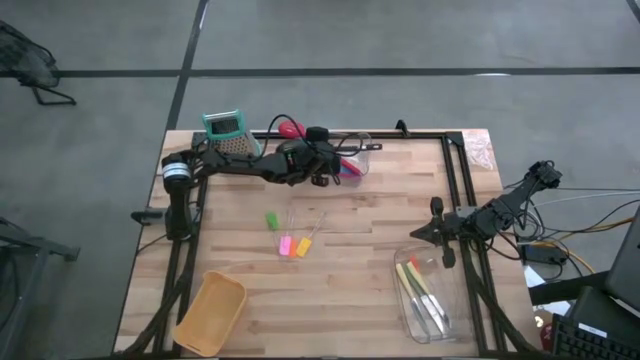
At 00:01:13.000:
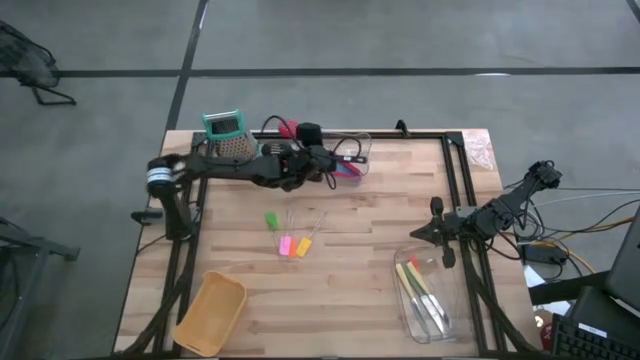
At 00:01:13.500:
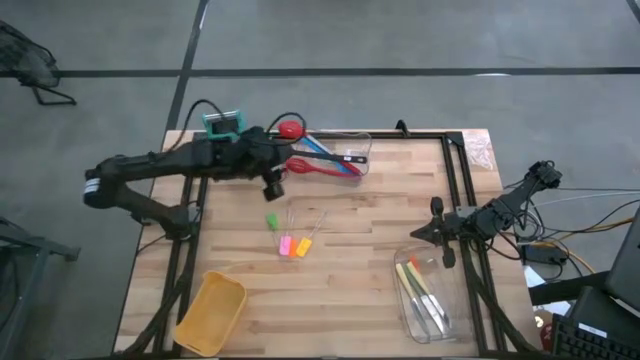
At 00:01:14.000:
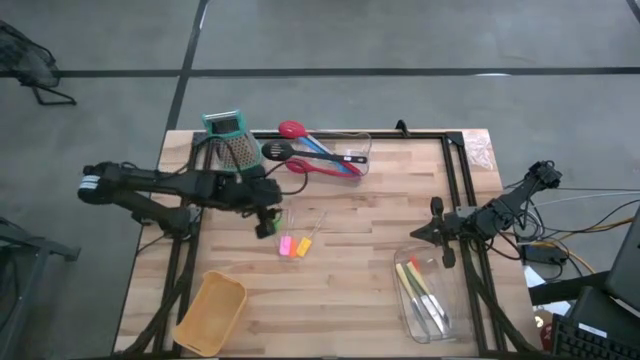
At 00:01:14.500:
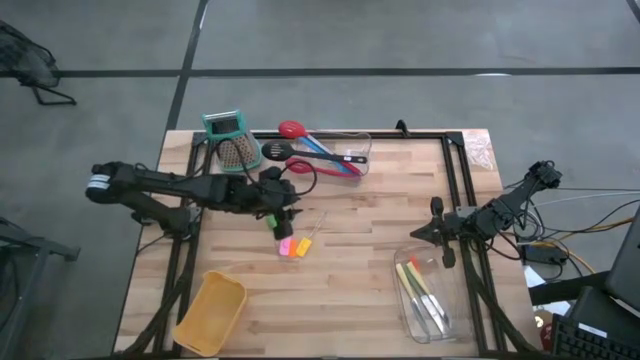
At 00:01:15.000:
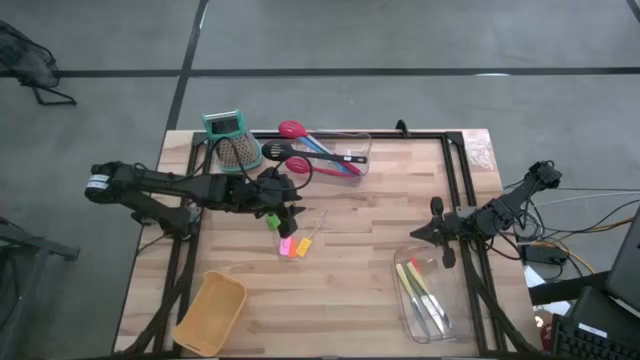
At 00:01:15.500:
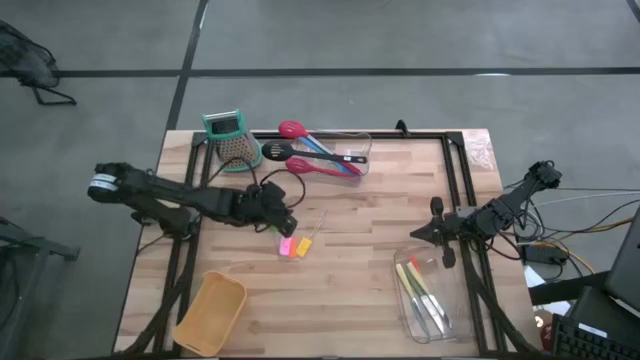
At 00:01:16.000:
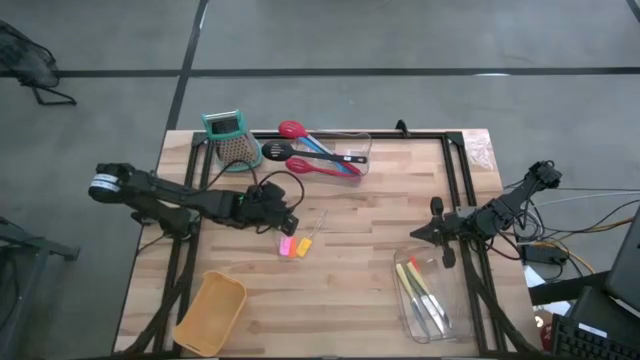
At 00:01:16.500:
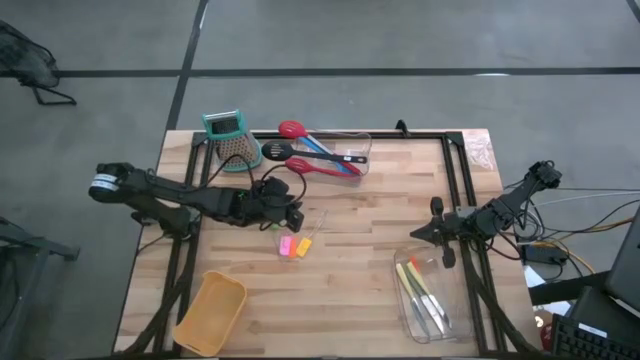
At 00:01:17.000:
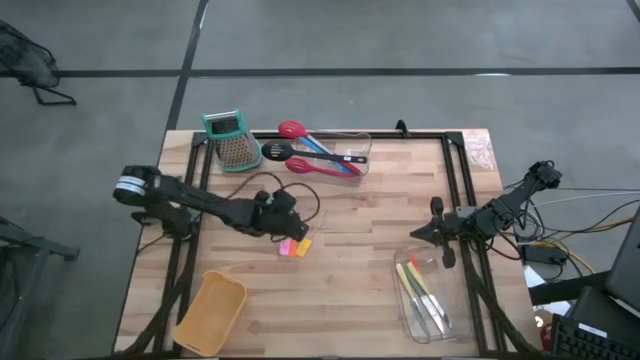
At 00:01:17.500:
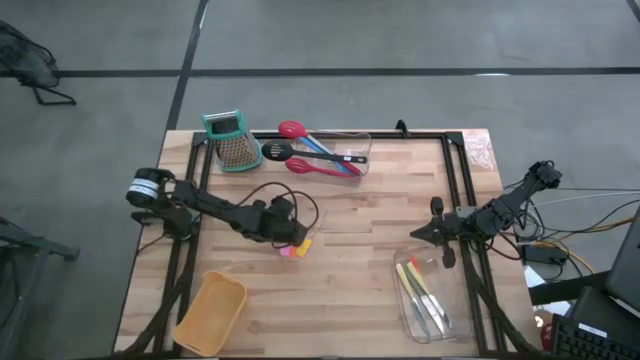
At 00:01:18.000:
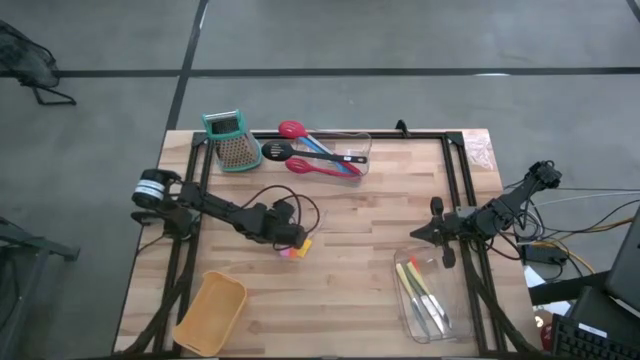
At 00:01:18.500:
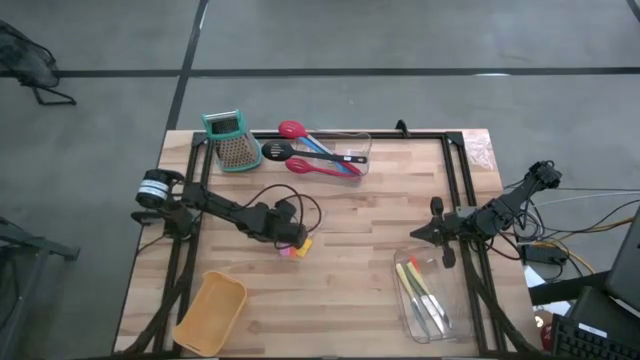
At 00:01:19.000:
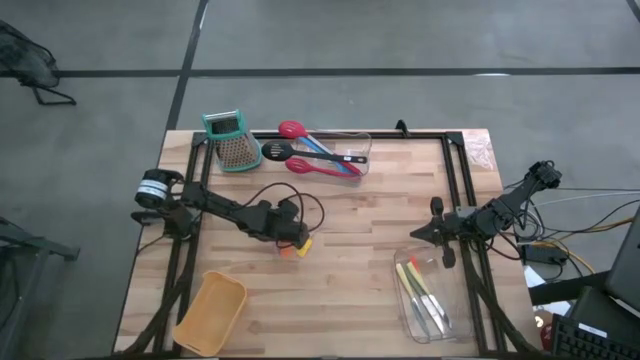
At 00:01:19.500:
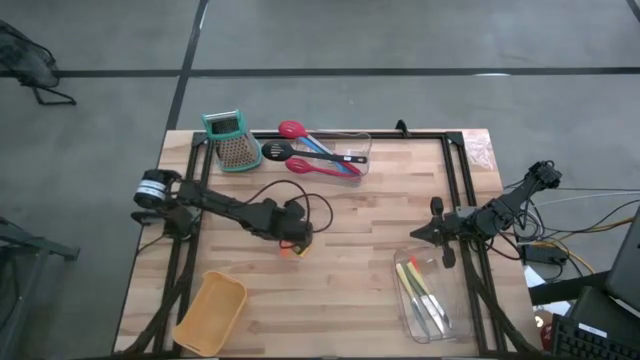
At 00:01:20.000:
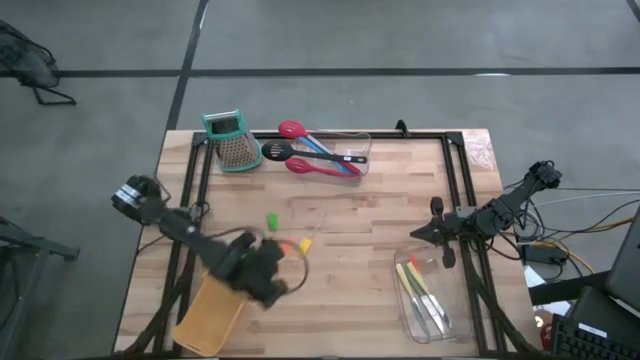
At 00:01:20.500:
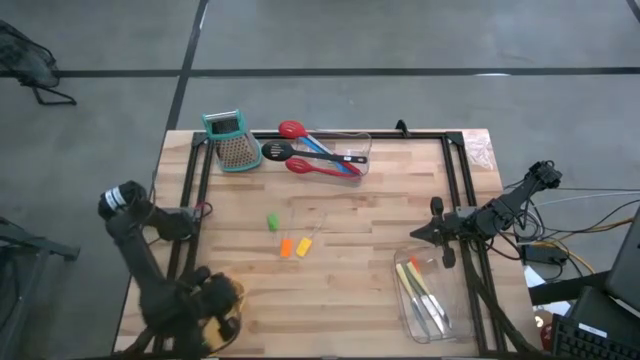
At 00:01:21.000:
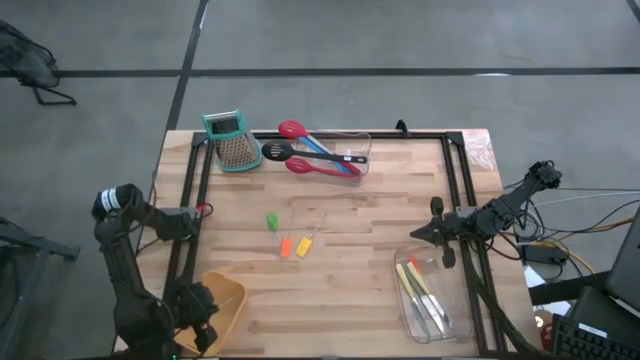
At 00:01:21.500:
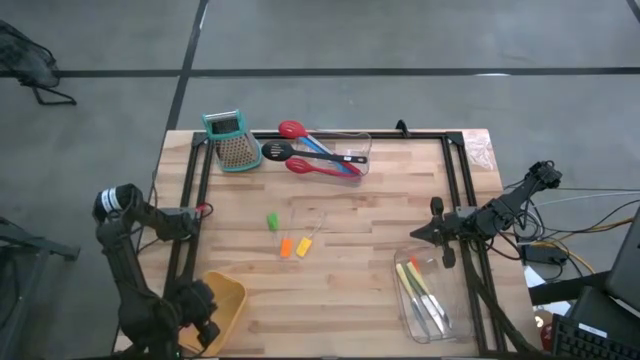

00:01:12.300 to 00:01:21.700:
Task: Pick & Place Kitchen Items
Put the pink spatula into the yellow bin

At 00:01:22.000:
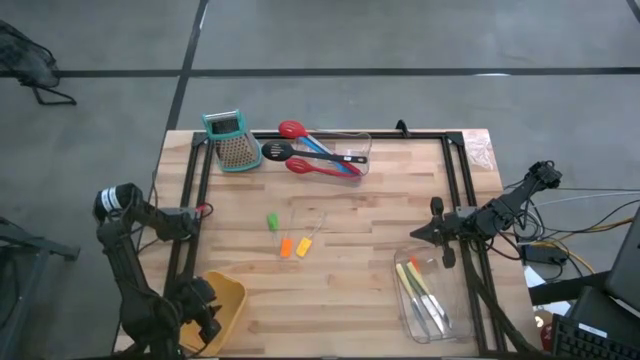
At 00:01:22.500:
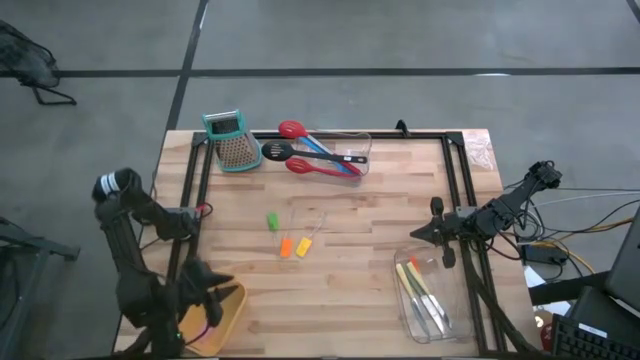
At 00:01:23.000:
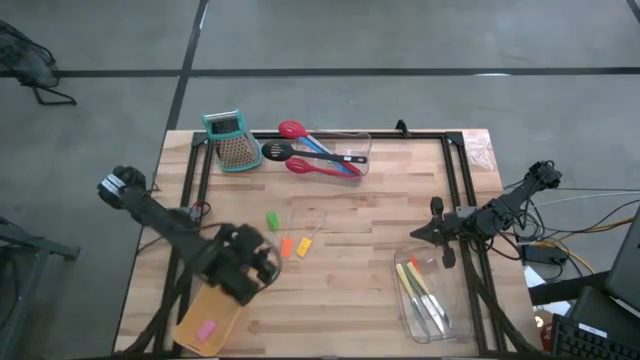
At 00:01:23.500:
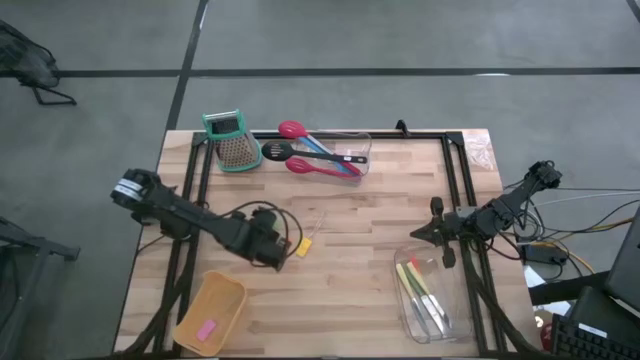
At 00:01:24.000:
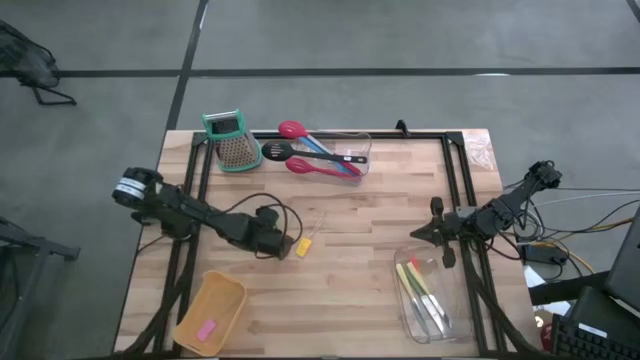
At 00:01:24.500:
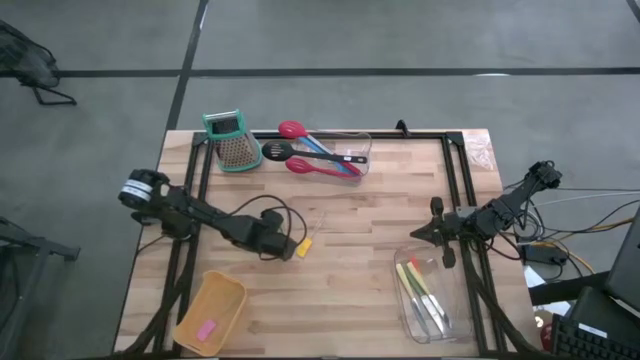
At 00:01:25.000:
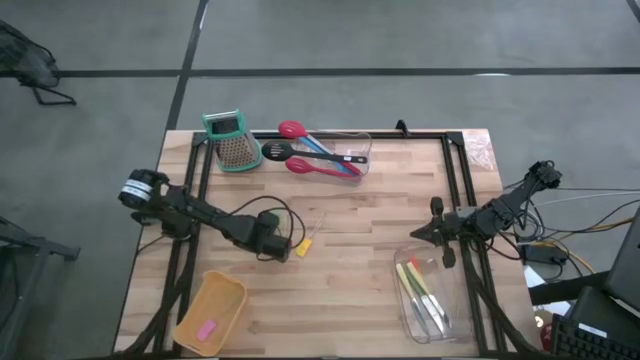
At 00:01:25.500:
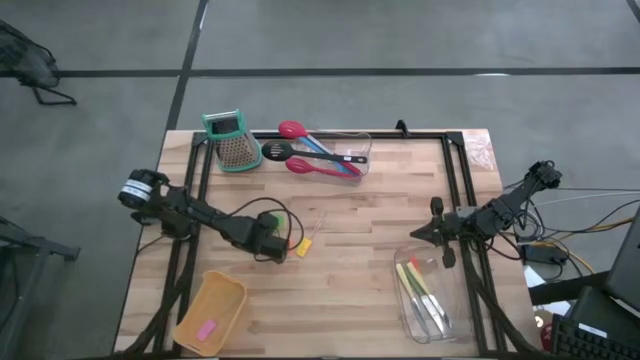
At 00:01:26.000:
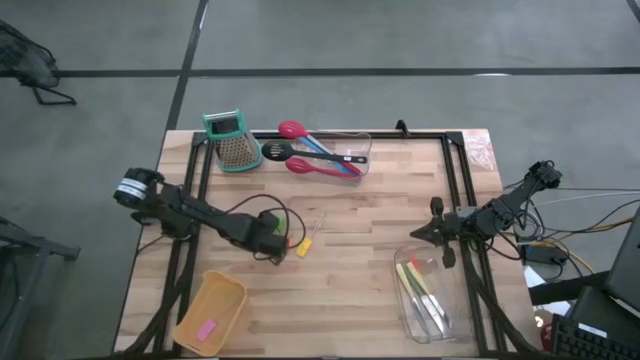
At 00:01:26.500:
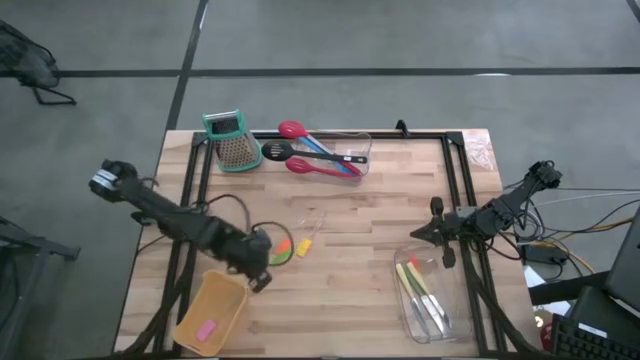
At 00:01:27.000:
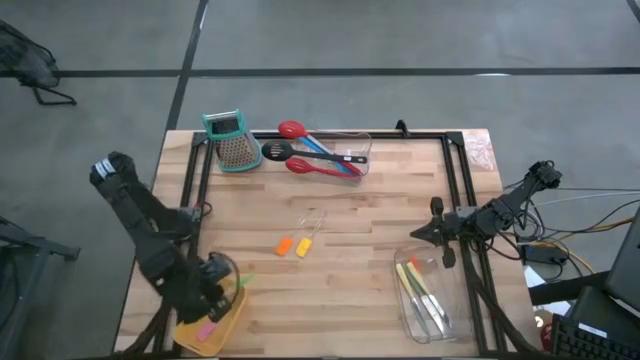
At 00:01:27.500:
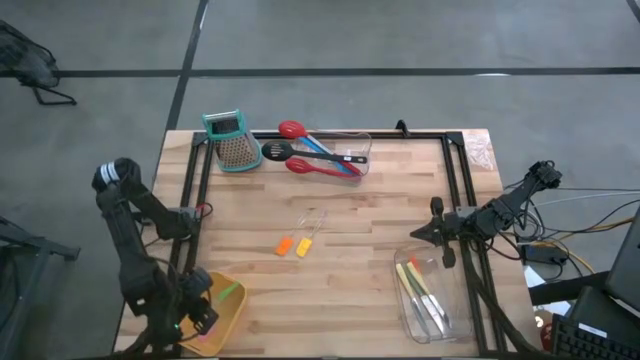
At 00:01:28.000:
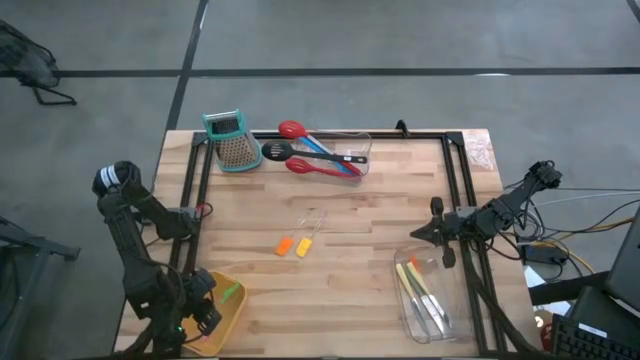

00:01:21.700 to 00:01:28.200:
Put the green spatula into the yellow bin

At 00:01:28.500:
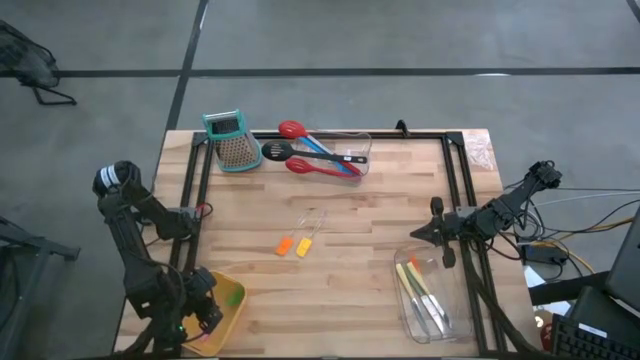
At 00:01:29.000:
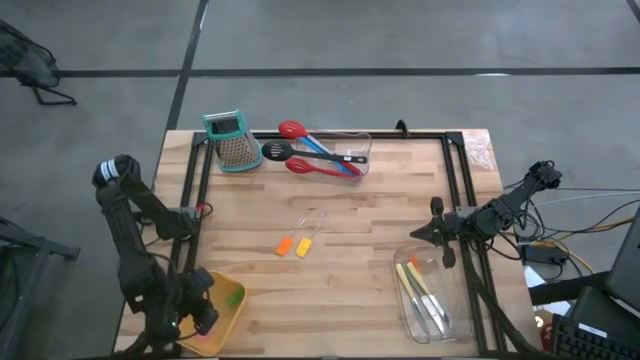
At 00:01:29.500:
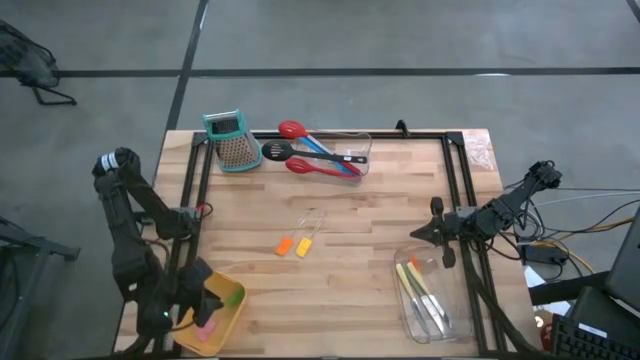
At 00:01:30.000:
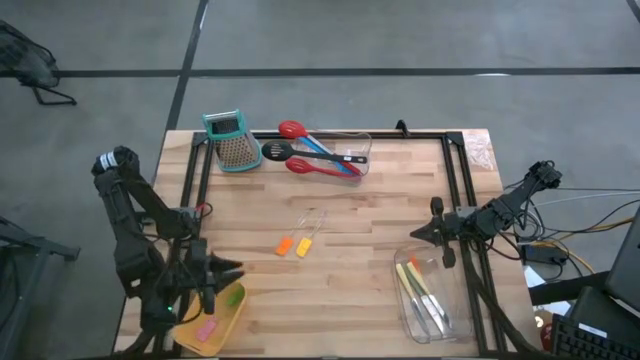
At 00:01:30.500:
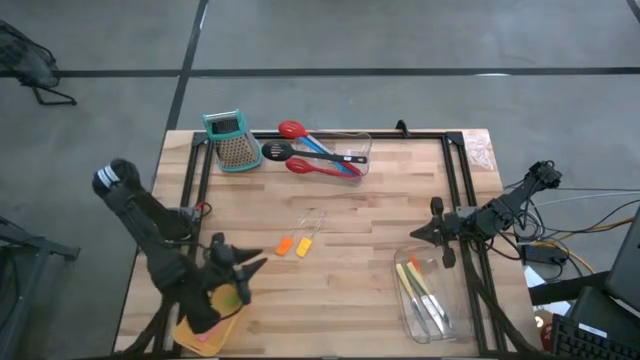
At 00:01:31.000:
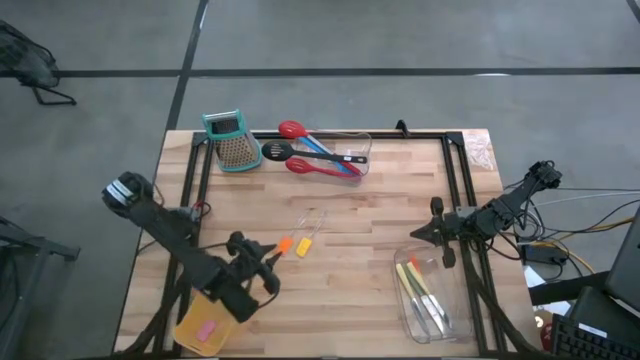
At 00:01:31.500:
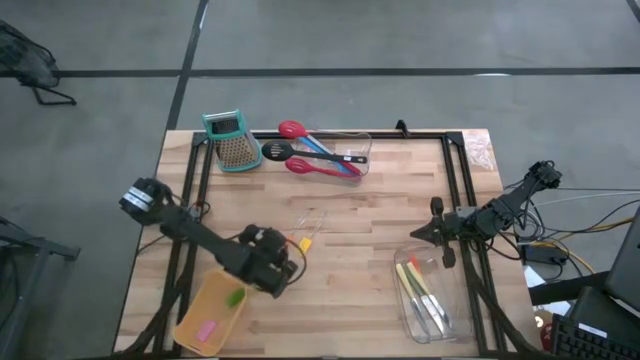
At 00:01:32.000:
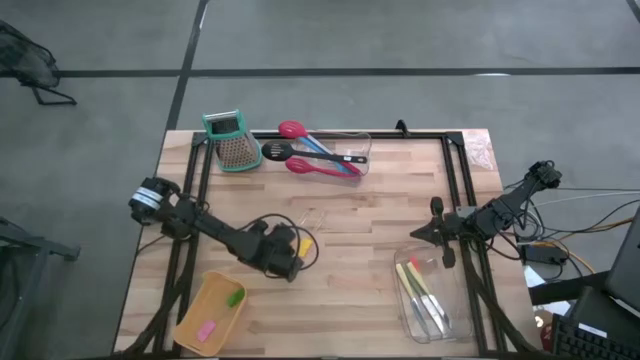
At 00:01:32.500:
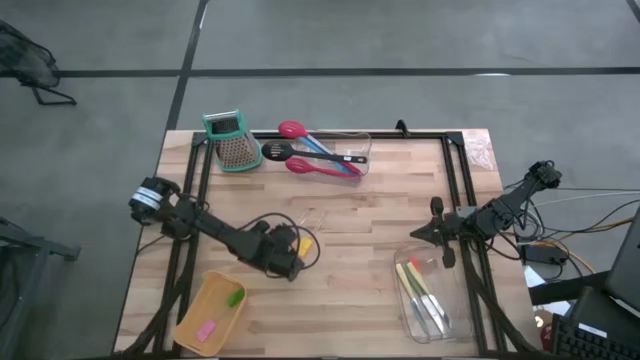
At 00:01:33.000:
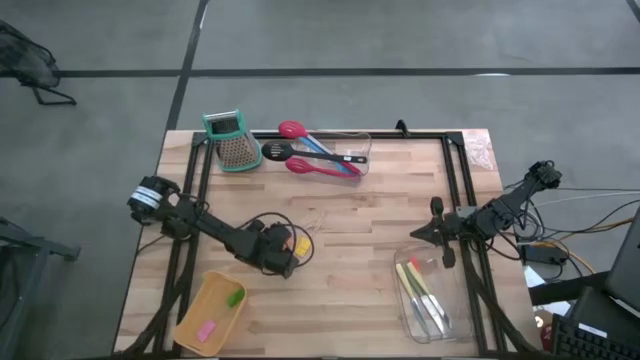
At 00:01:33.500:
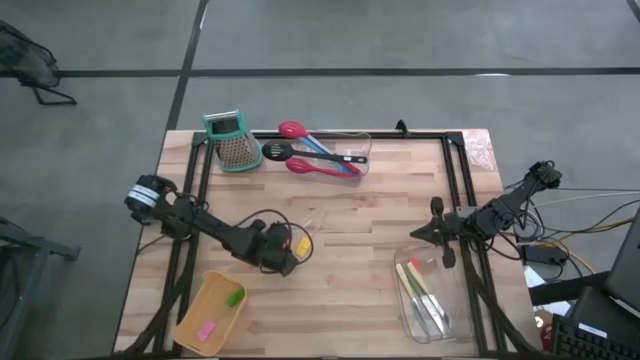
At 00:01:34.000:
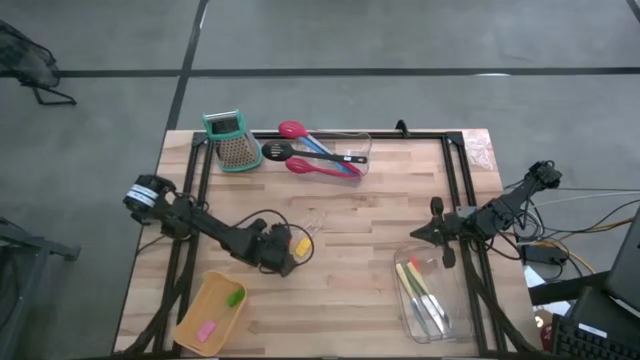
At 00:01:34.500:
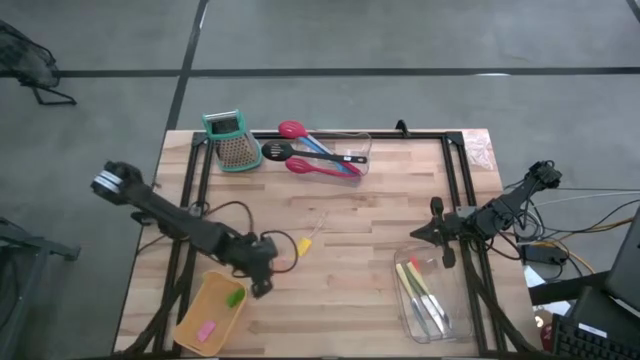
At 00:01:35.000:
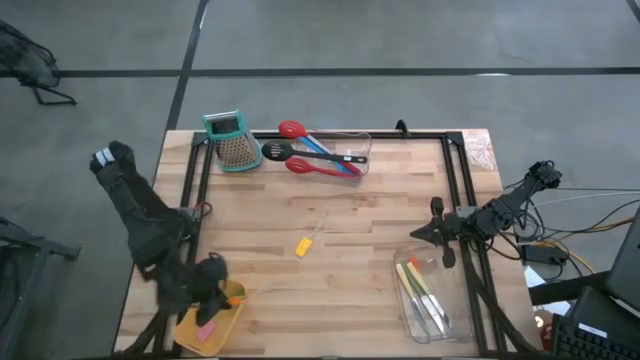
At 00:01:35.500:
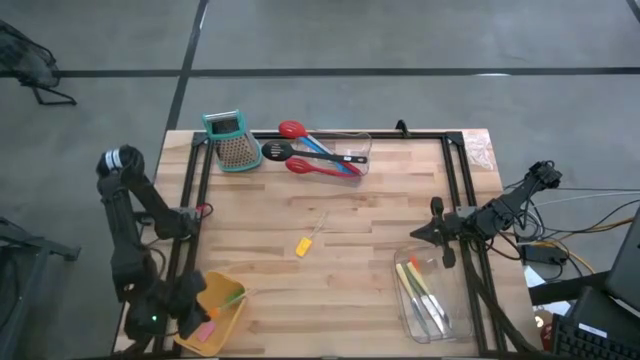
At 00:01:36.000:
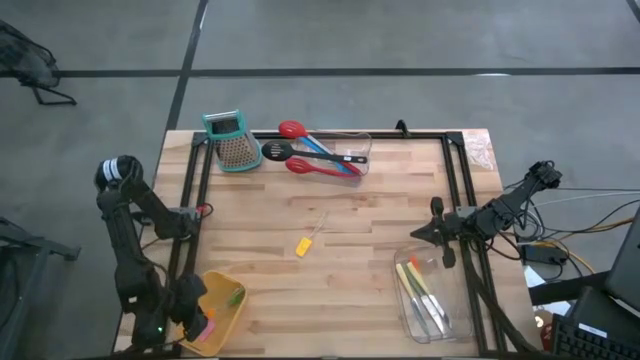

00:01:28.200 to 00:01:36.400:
Put the orange spatula into the yellow bin
